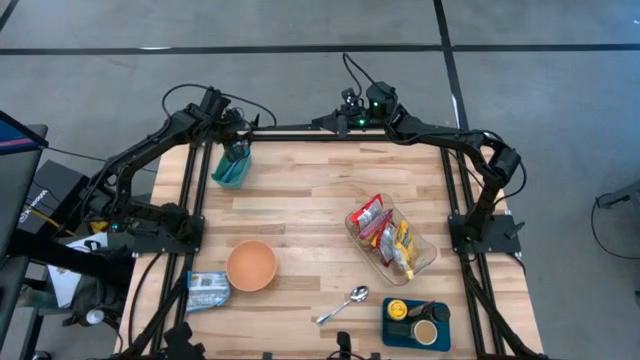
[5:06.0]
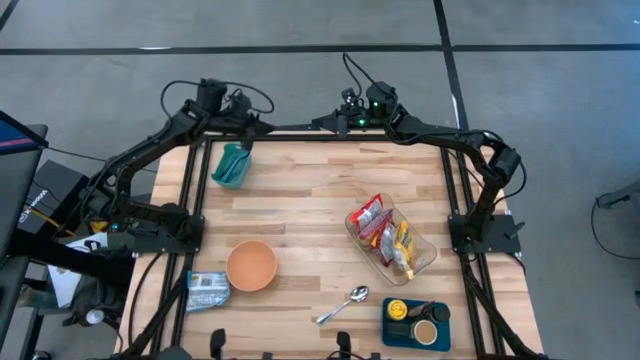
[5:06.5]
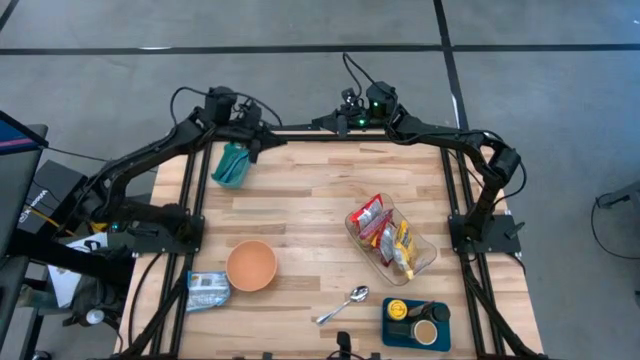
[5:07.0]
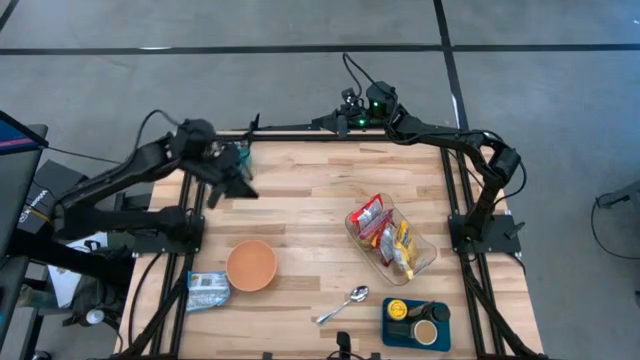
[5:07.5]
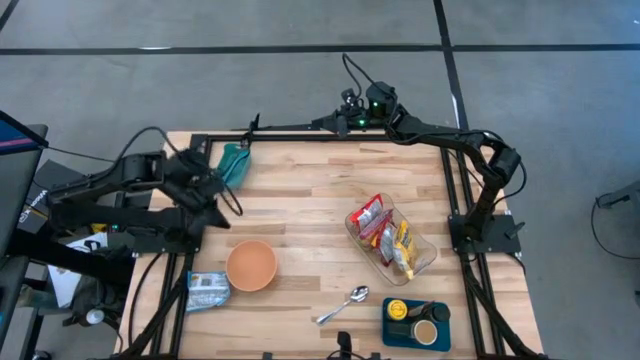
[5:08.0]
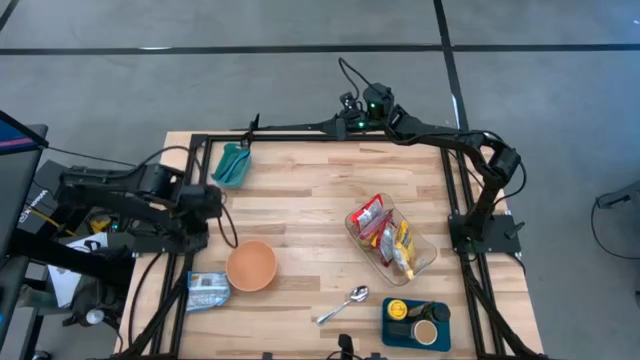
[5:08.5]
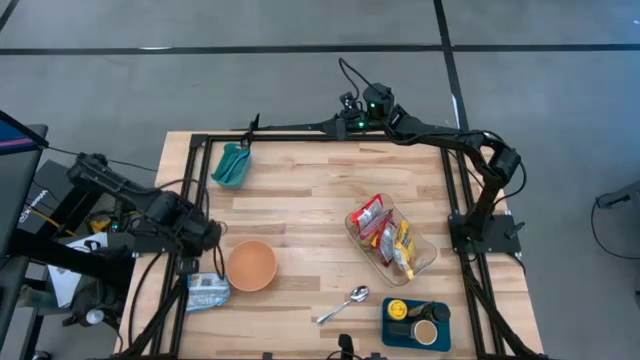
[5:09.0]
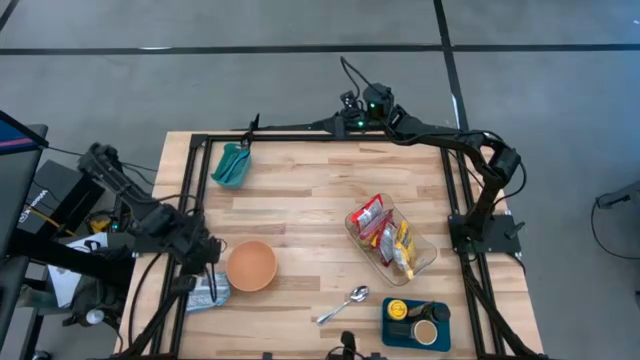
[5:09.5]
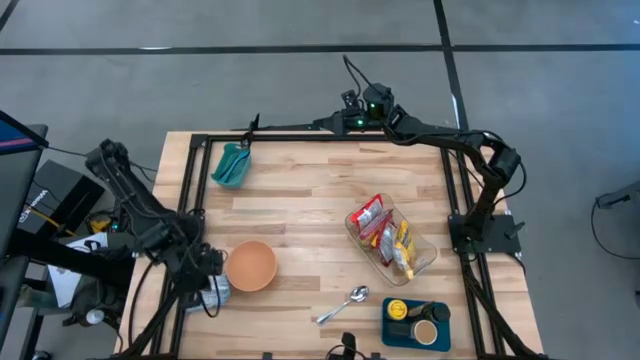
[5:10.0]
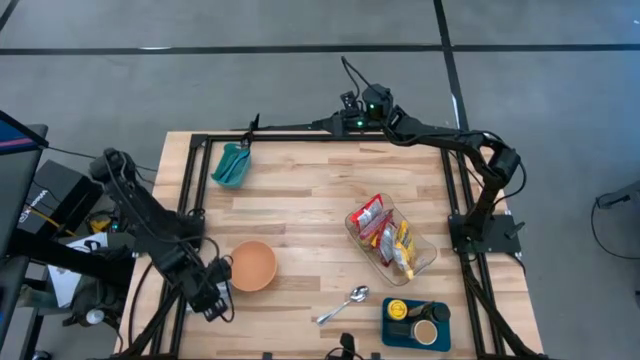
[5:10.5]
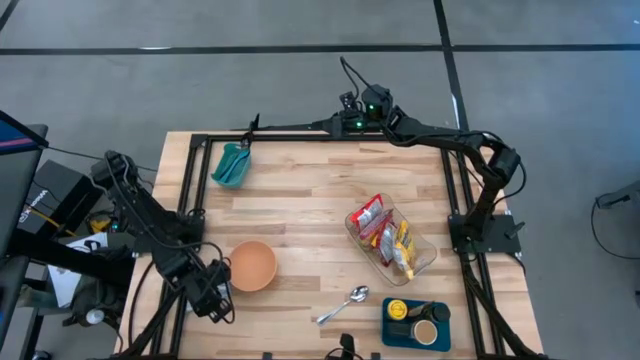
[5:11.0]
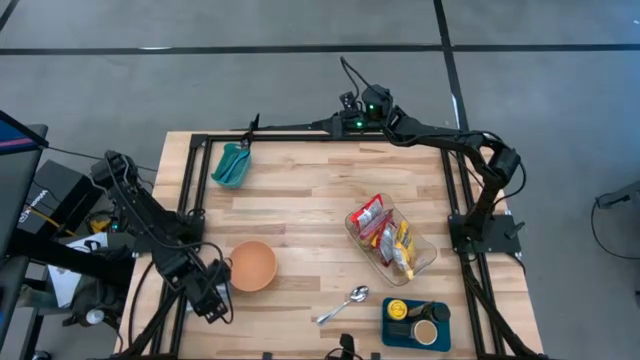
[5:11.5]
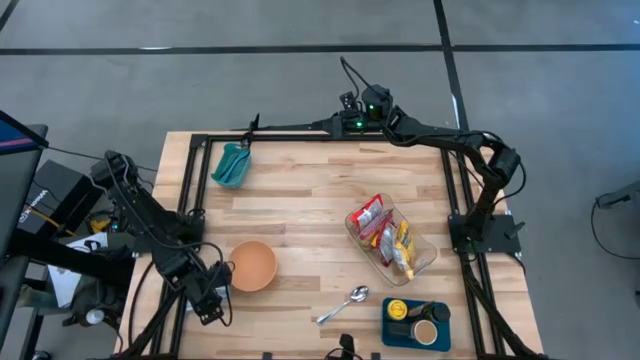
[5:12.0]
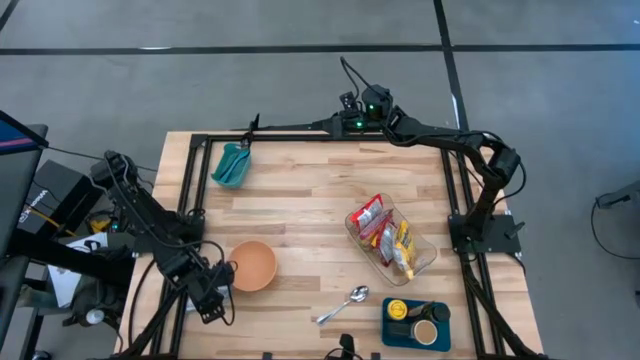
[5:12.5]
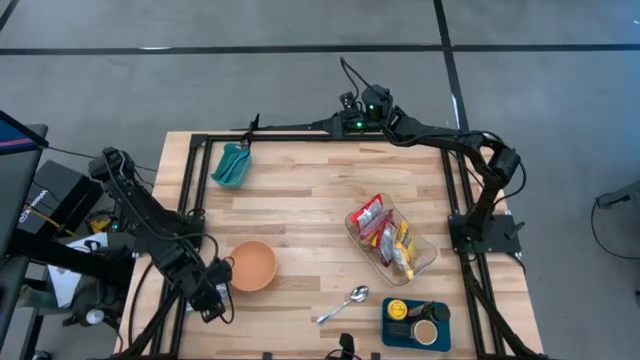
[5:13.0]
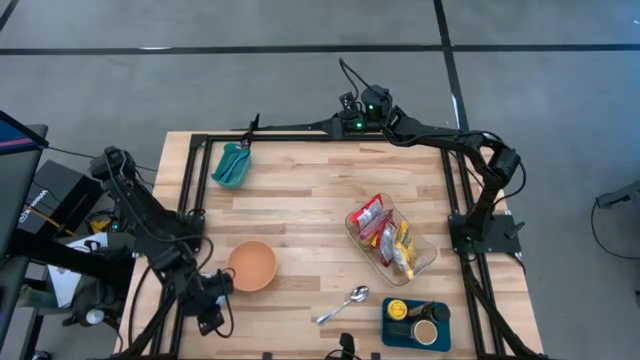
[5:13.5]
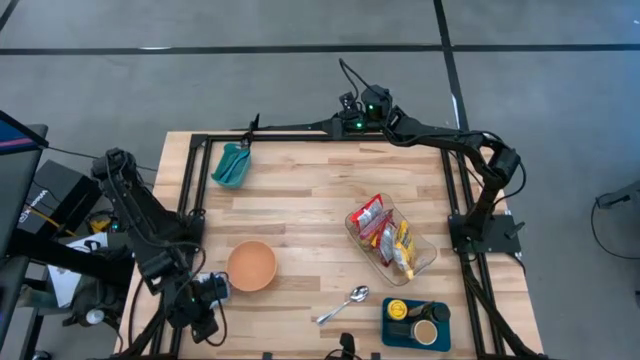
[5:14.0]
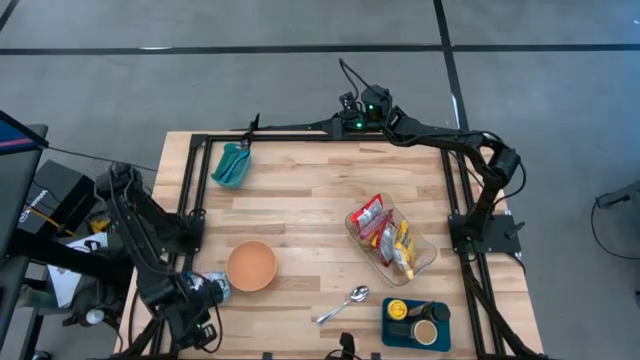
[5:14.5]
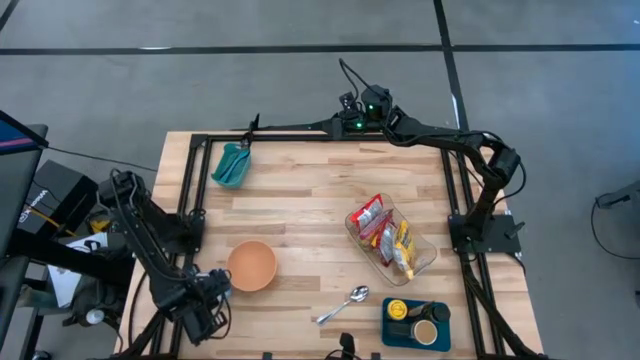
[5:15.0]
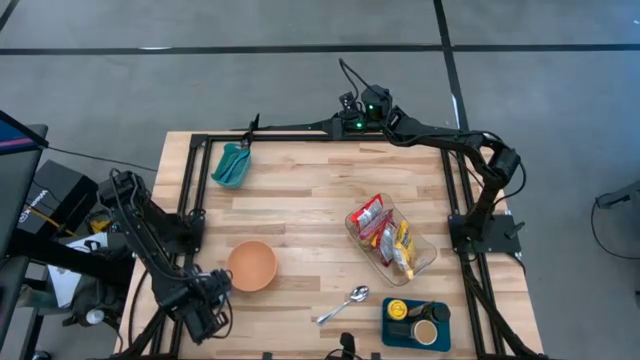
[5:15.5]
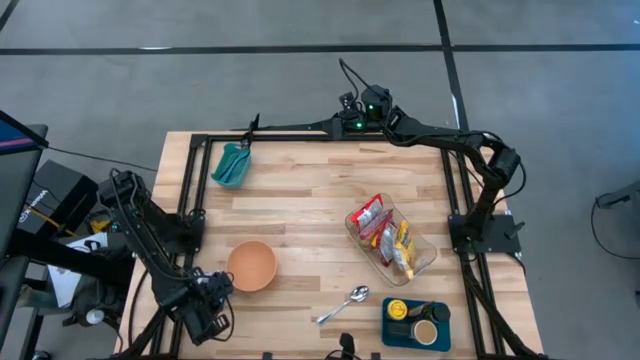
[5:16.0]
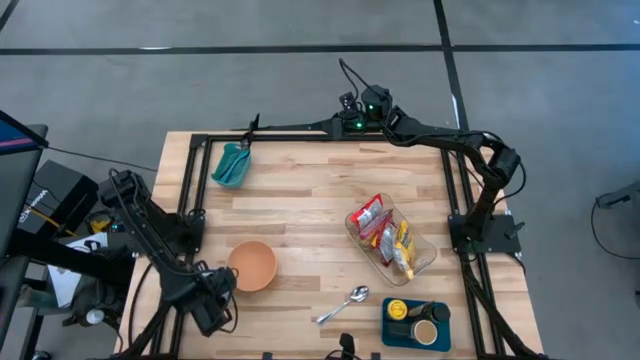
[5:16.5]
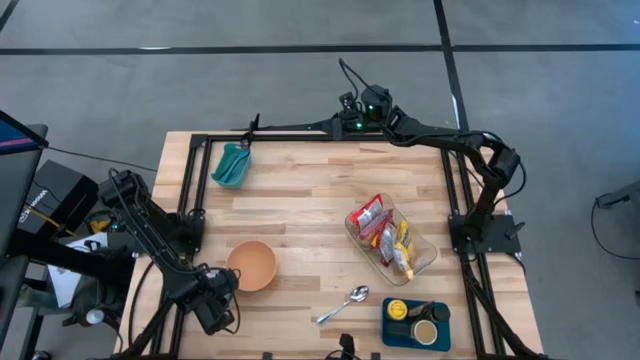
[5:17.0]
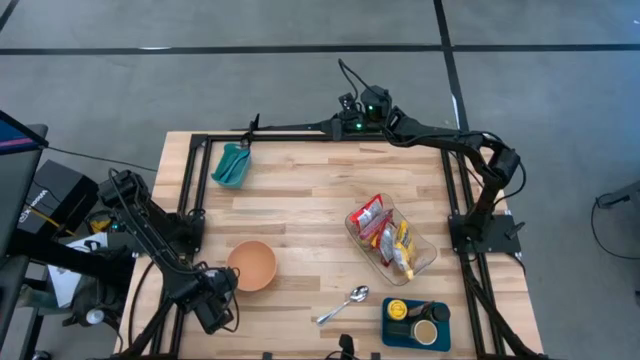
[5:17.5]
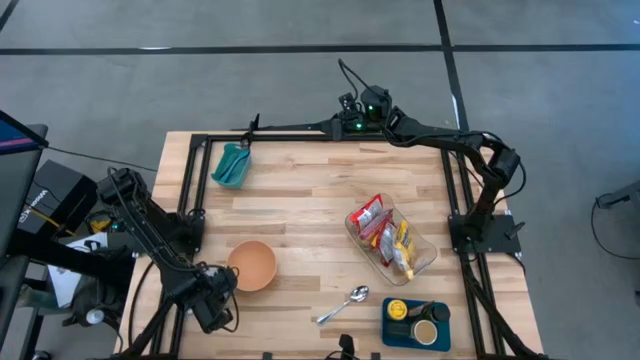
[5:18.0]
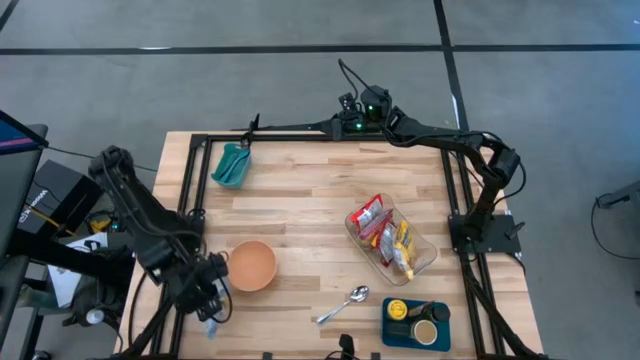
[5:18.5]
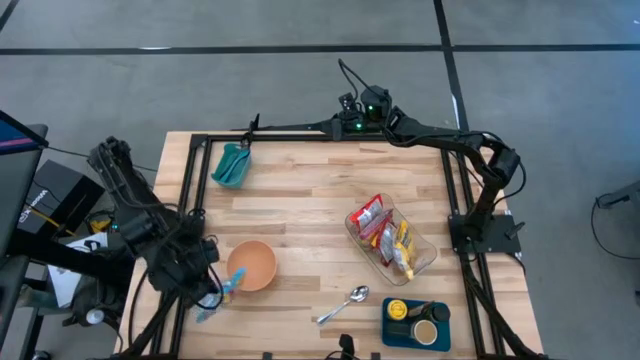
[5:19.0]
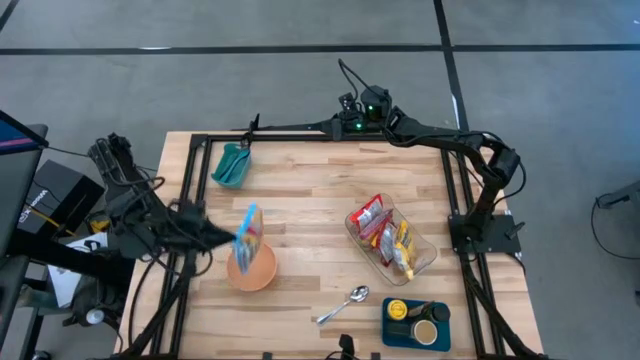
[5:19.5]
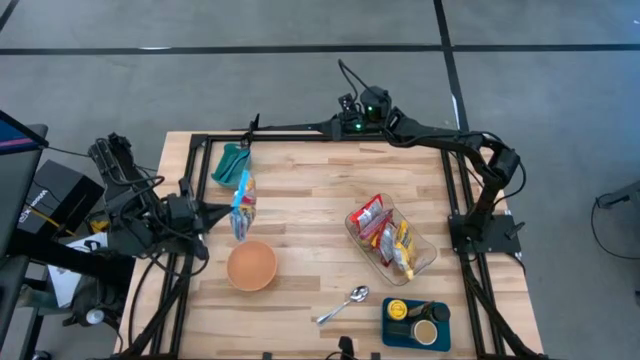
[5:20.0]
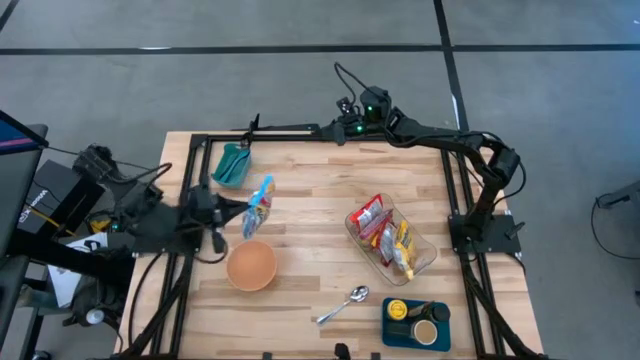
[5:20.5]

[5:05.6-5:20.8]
Task: Pick & Place Food Item
Put the blue noodle pack into the transparent bin

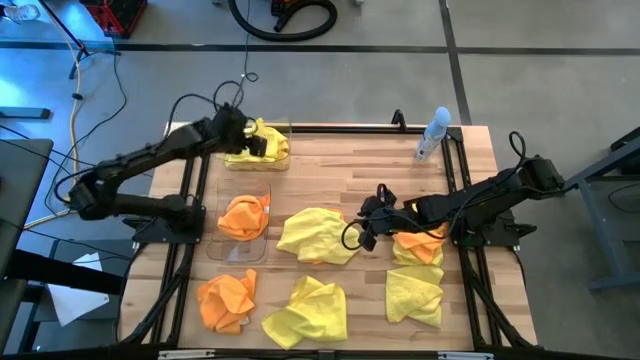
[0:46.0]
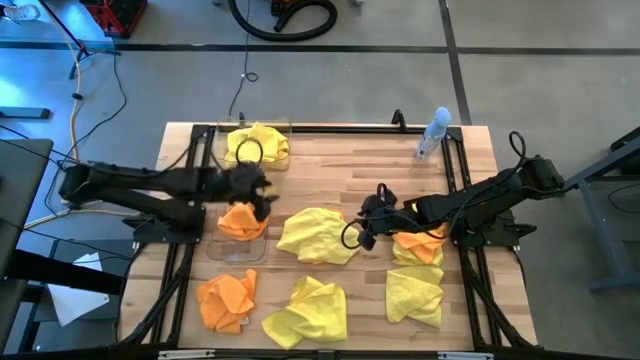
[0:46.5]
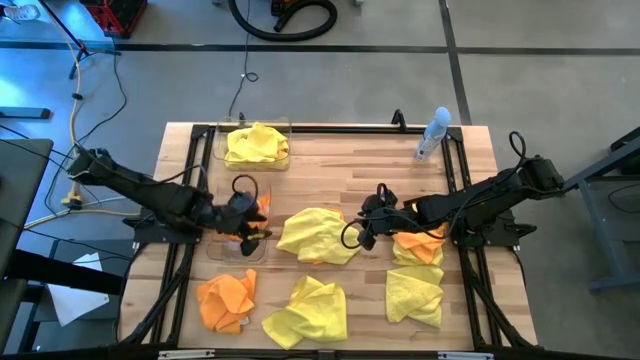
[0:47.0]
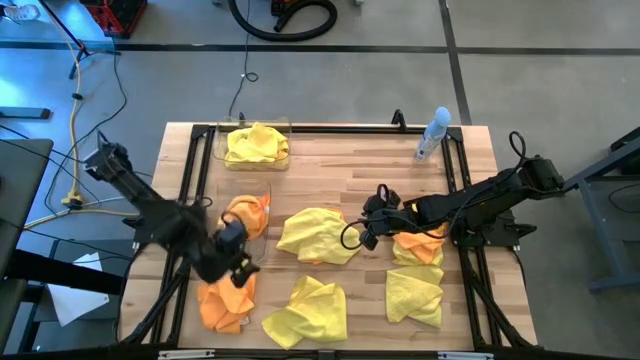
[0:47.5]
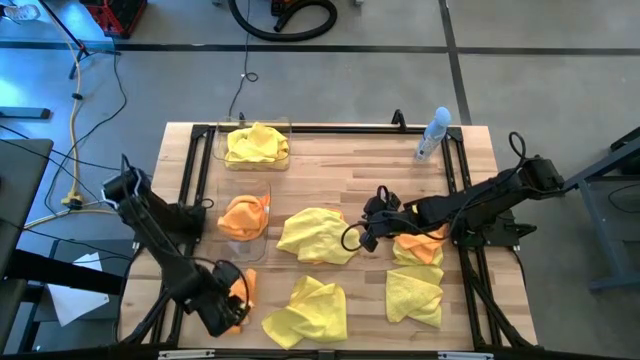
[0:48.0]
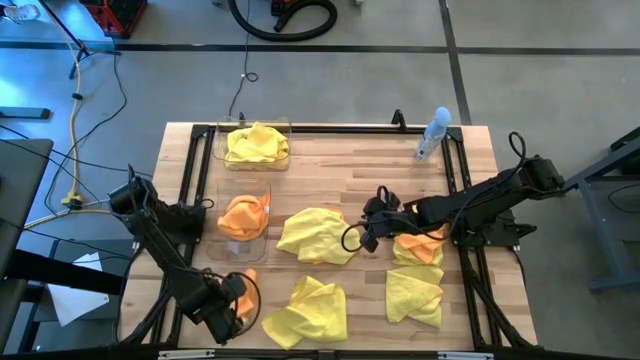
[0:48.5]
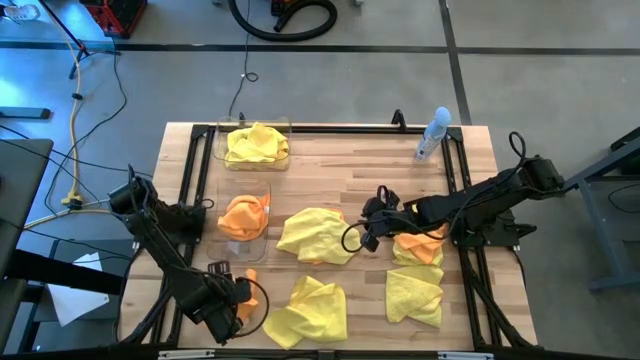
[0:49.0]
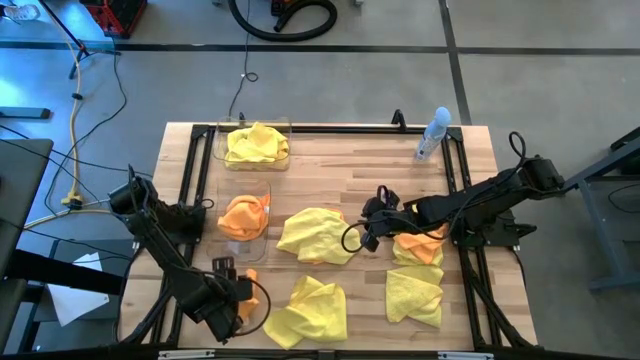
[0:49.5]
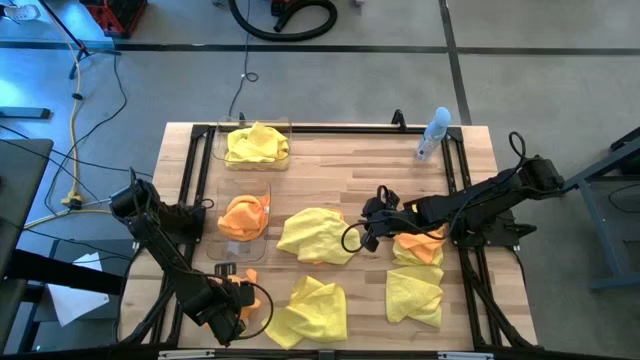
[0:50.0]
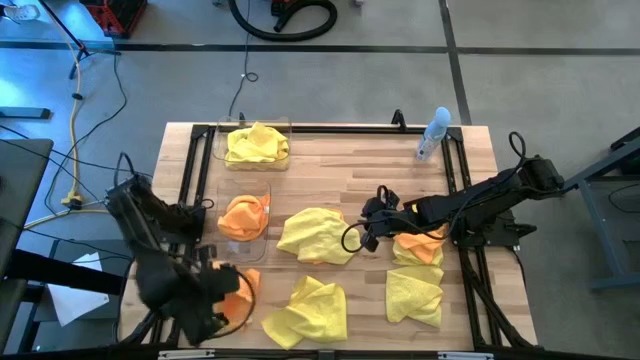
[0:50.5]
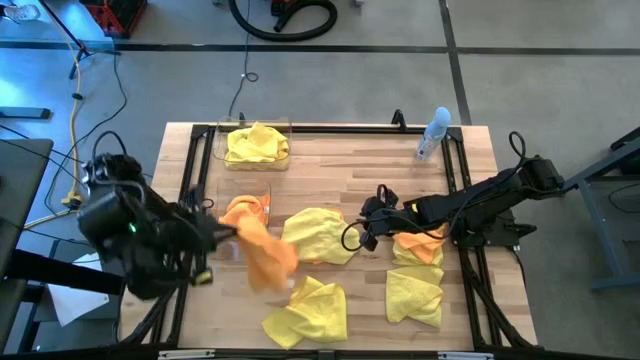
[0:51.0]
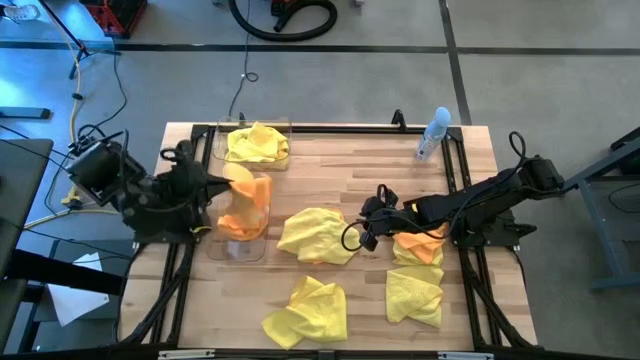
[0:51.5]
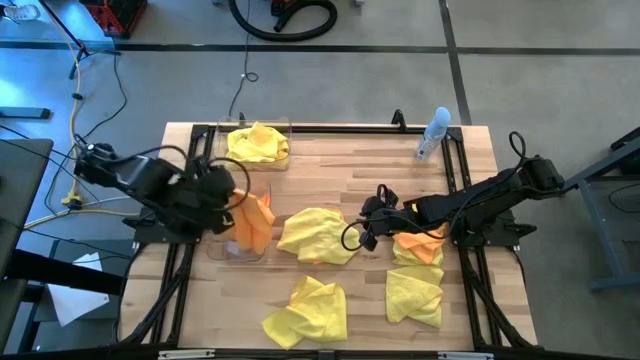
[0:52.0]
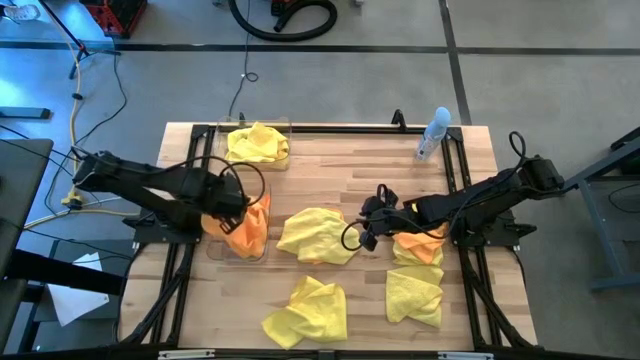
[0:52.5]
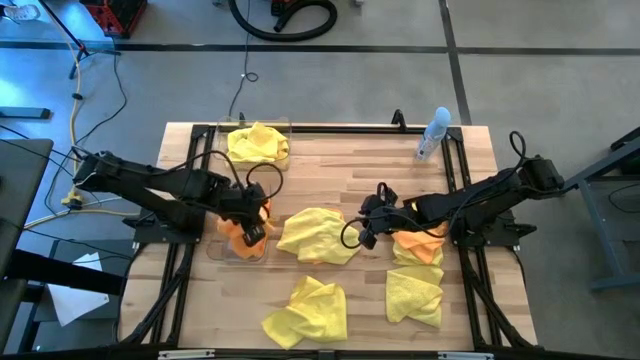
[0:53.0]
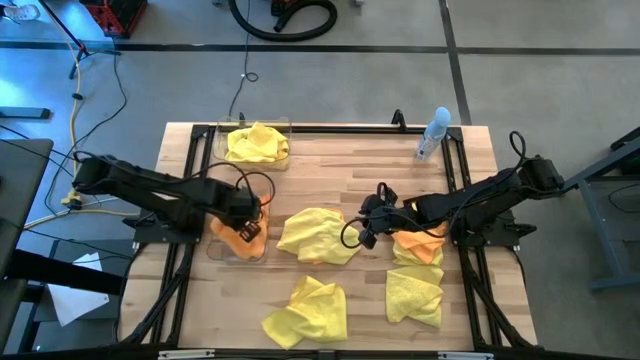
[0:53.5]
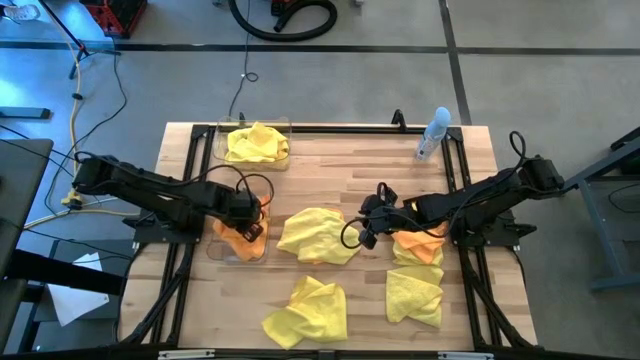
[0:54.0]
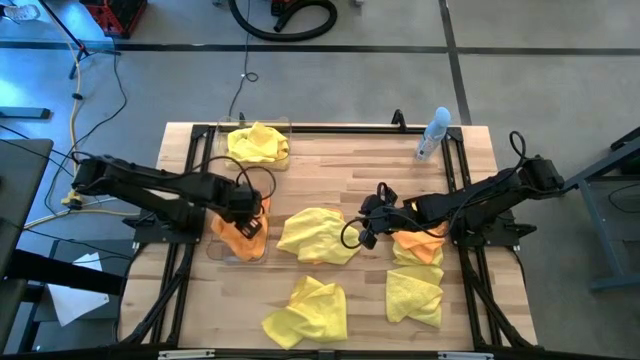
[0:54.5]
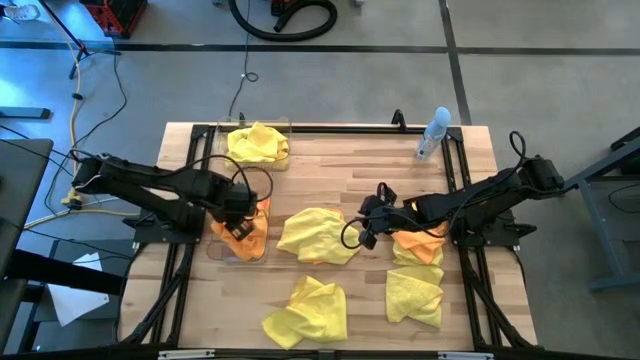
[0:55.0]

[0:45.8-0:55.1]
Task: Sort microfiber towel by color & place in baskets
Put the orange microfiber towel into the bottom transparent bin
